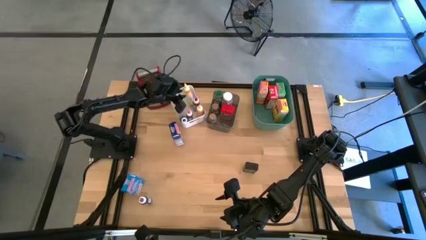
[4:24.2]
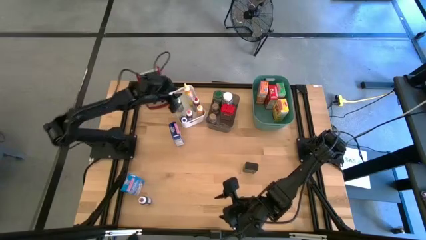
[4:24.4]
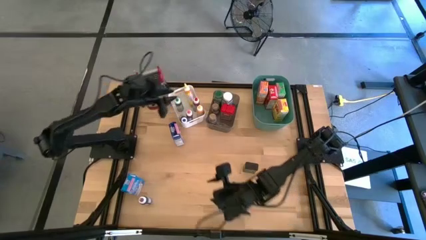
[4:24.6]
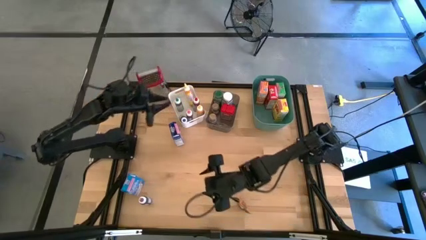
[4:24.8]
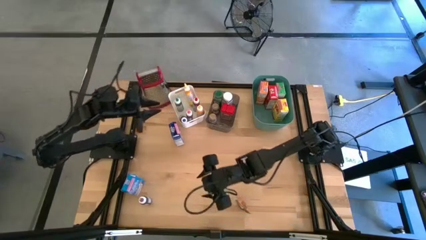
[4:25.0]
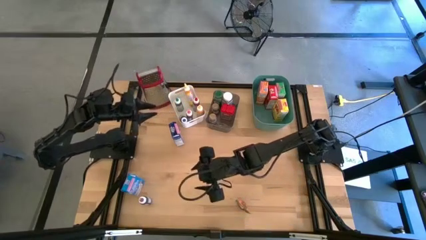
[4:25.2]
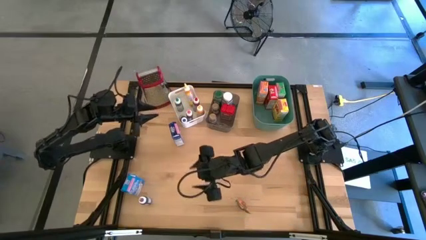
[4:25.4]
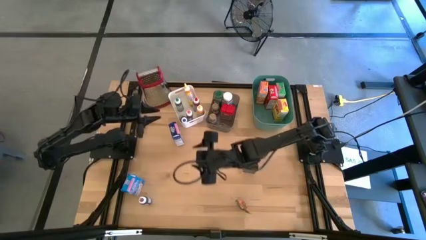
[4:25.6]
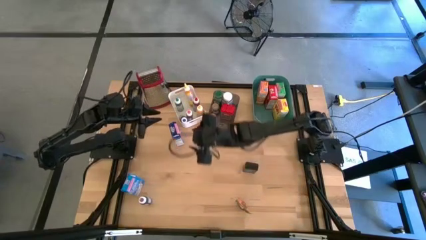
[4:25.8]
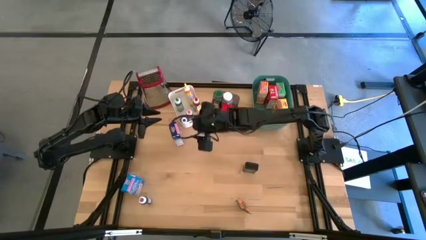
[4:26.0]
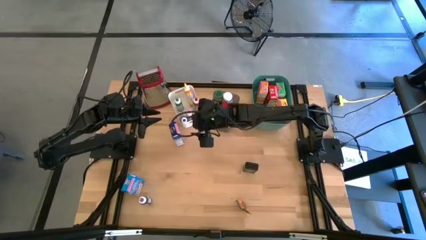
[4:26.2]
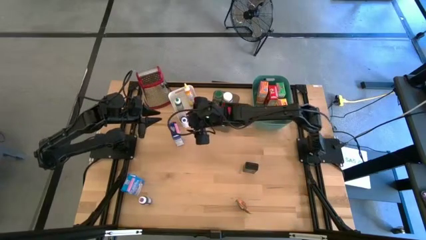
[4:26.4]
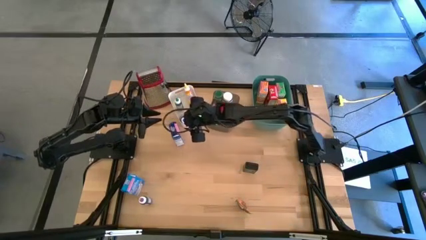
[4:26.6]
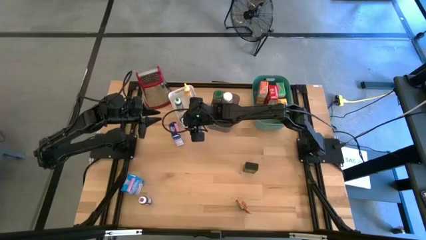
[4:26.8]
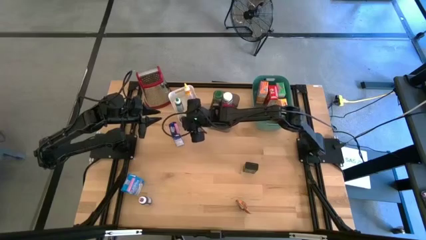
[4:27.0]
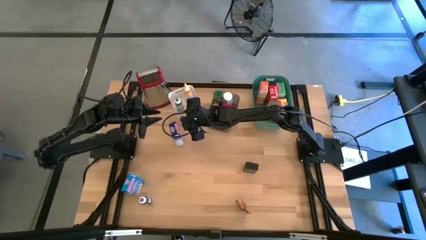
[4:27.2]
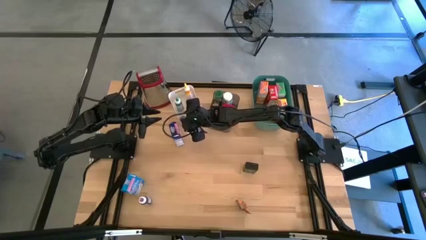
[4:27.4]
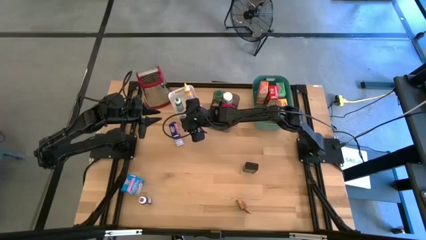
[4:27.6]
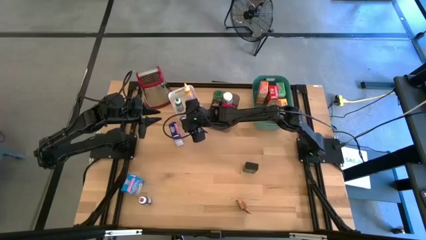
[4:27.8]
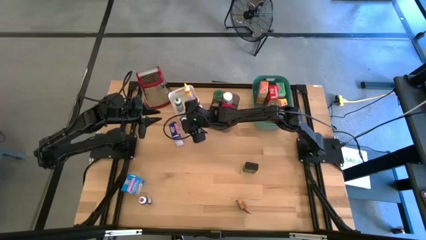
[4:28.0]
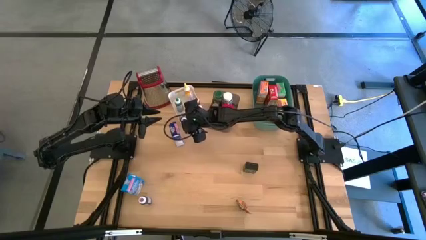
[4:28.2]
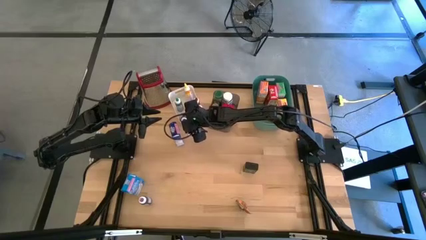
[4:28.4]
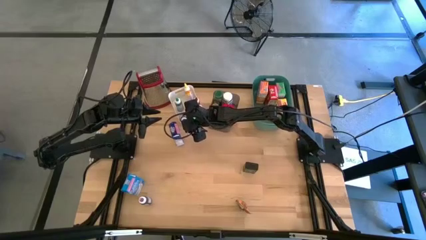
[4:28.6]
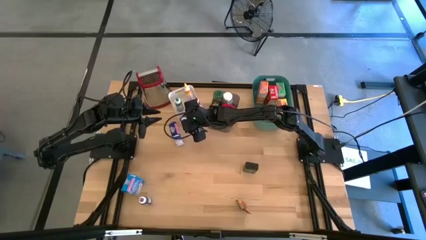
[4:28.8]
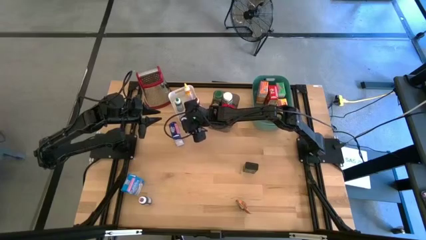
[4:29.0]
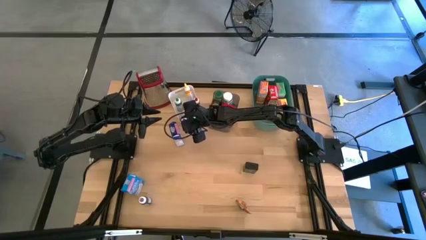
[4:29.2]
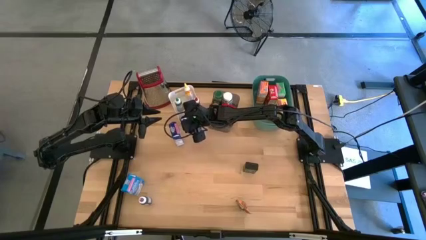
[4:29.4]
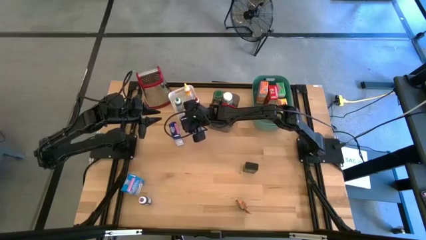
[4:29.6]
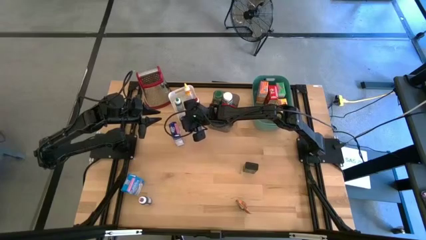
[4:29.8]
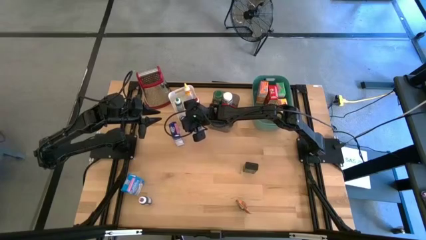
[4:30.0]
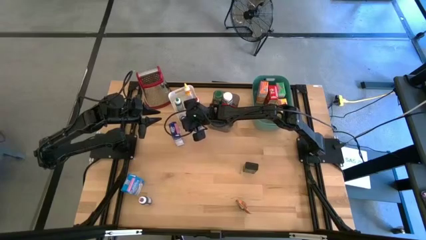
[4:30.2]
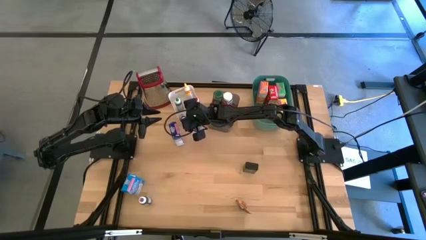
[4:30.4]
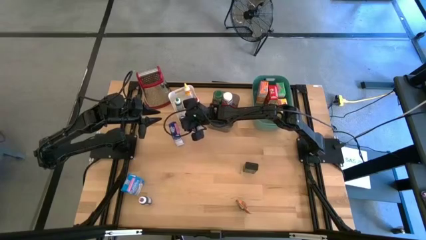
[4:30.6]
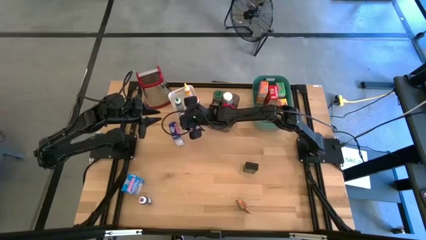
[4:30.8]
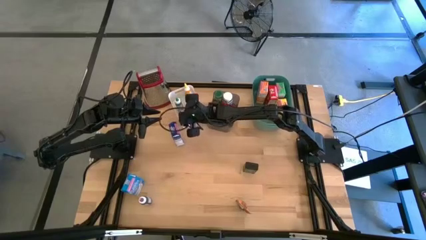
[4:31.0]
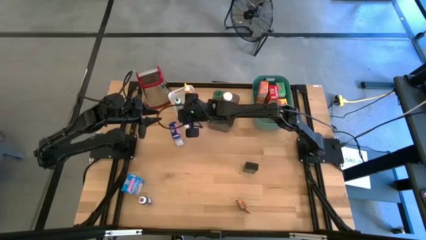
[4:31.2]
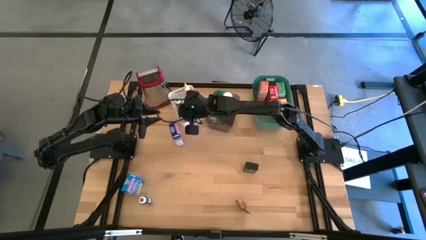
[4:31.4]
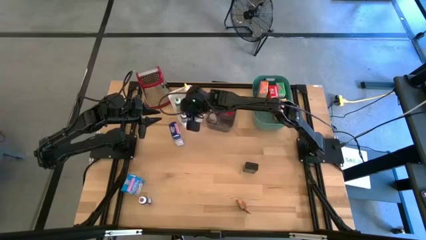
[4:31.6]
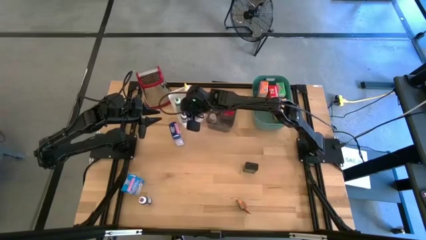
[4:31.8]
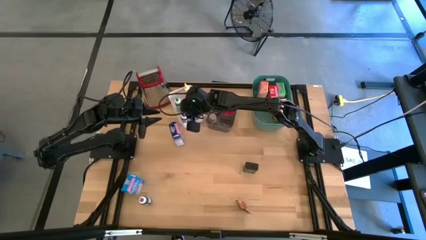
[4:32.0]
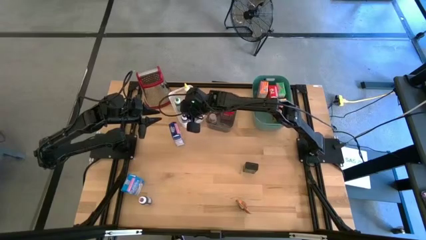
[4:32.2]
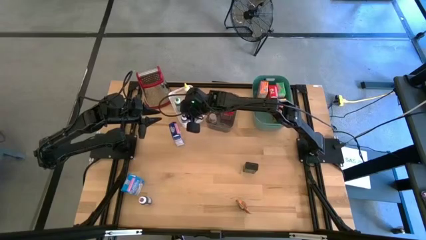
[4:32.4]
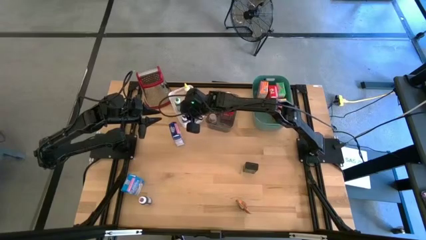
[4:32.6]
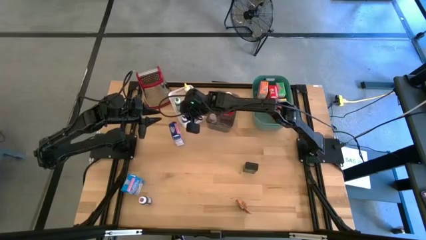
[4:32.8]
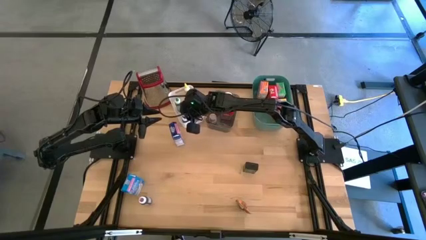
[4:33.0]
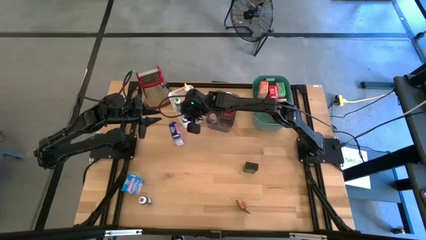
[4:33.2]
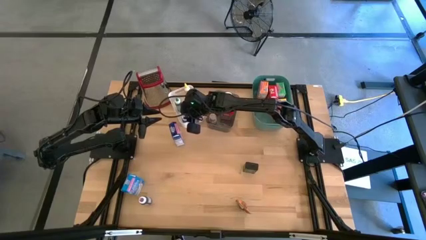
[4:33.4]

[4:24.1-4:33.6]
Task: Pick & Place Kitchen Items
Adjust the blue food coloring in the white bin

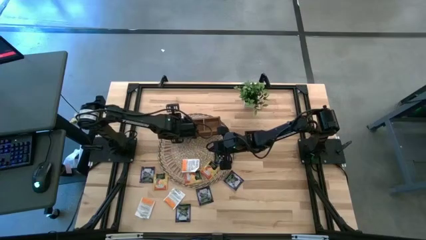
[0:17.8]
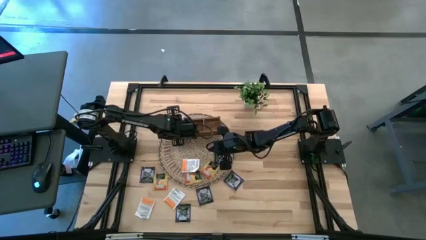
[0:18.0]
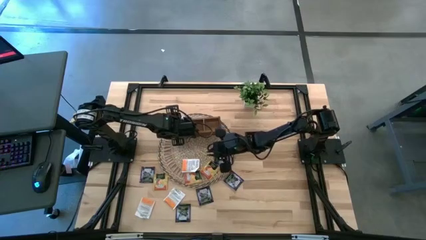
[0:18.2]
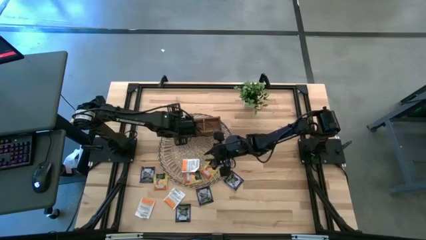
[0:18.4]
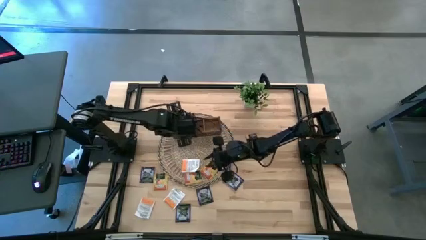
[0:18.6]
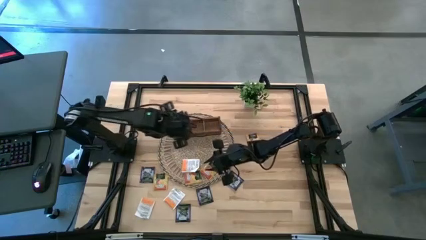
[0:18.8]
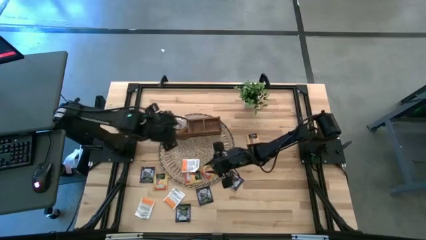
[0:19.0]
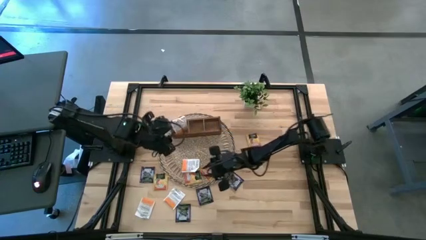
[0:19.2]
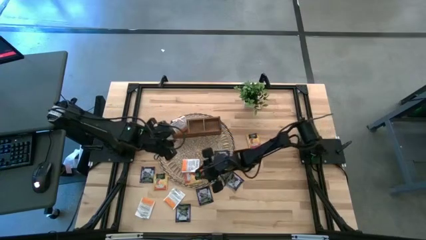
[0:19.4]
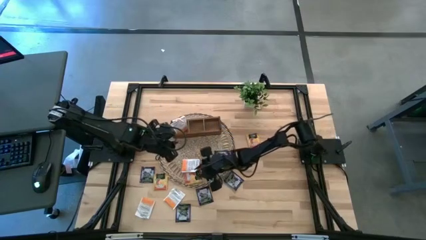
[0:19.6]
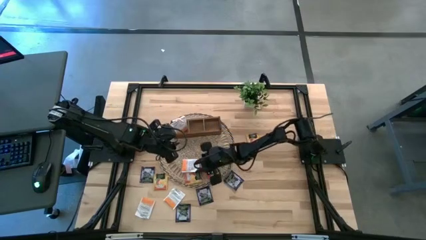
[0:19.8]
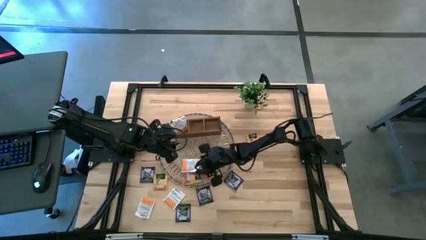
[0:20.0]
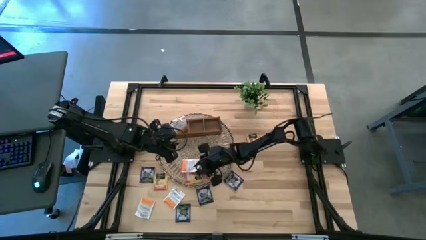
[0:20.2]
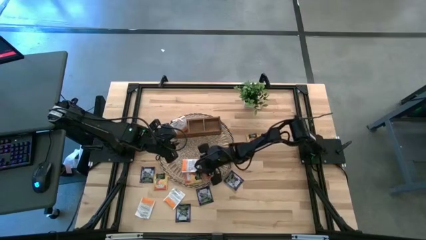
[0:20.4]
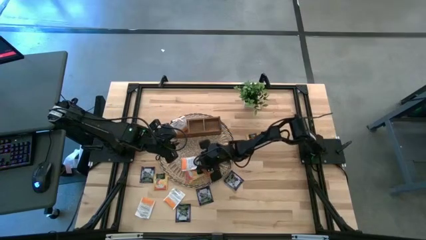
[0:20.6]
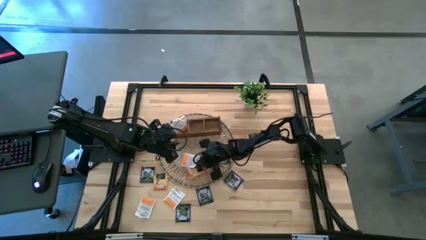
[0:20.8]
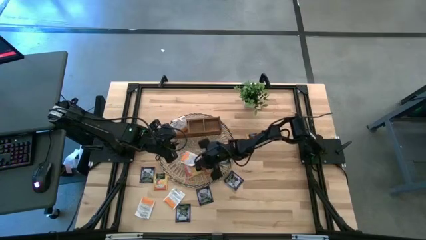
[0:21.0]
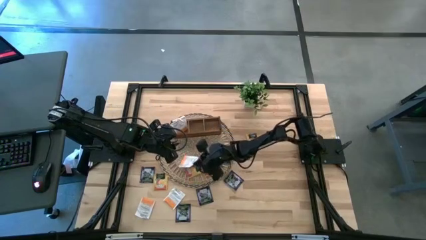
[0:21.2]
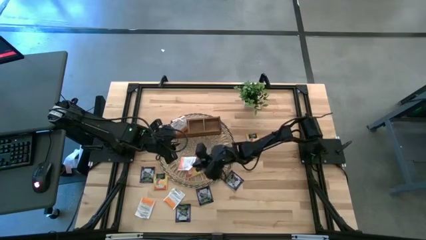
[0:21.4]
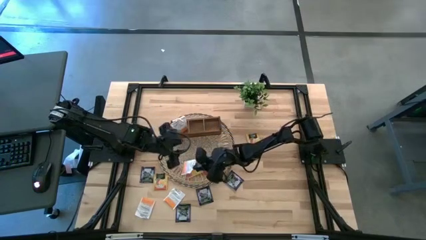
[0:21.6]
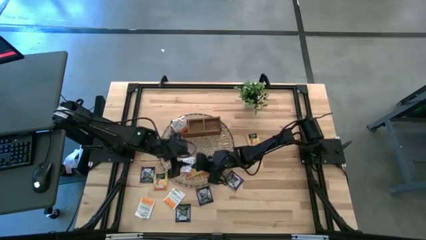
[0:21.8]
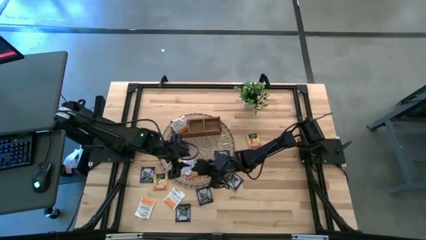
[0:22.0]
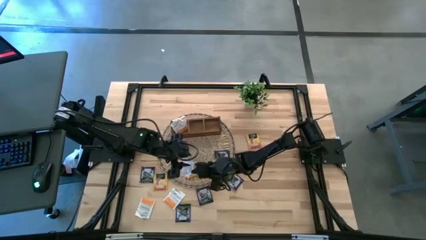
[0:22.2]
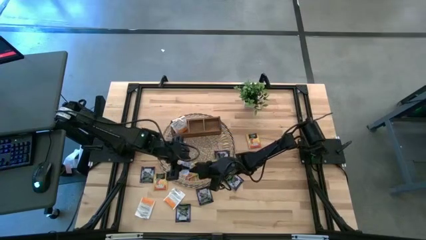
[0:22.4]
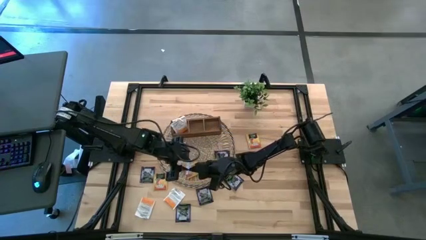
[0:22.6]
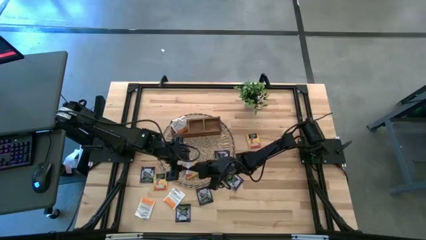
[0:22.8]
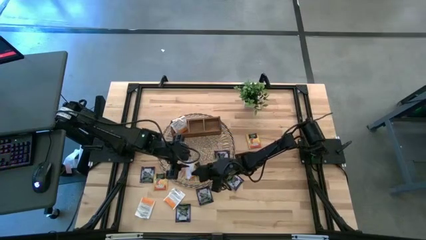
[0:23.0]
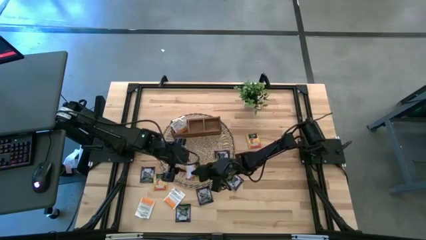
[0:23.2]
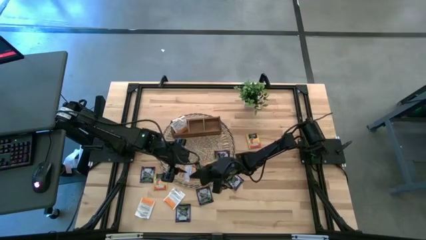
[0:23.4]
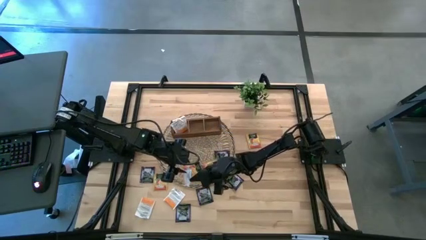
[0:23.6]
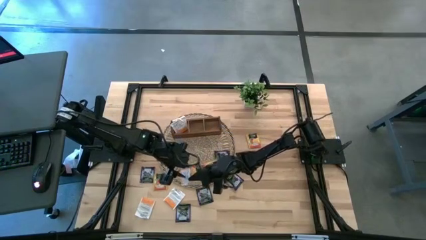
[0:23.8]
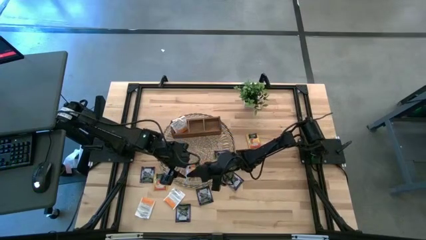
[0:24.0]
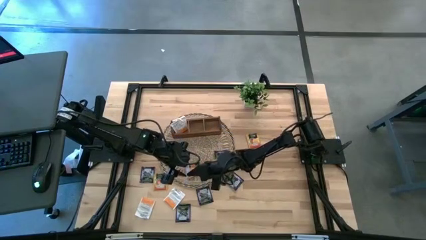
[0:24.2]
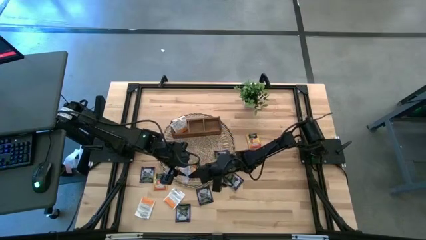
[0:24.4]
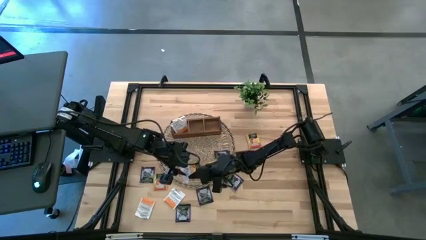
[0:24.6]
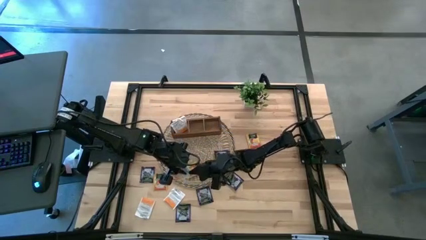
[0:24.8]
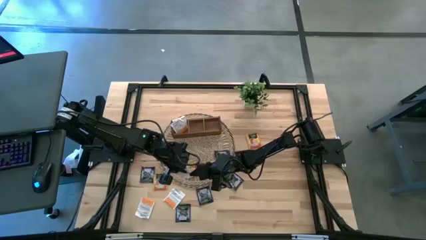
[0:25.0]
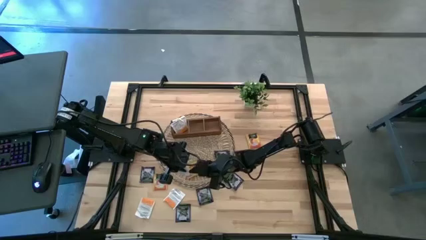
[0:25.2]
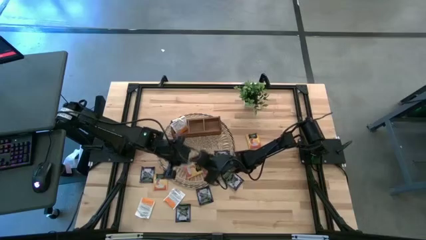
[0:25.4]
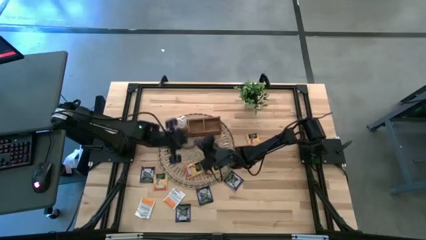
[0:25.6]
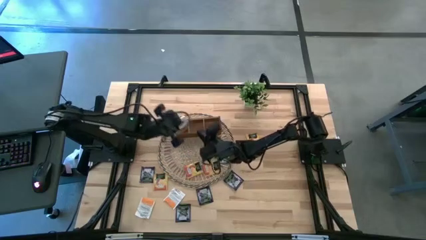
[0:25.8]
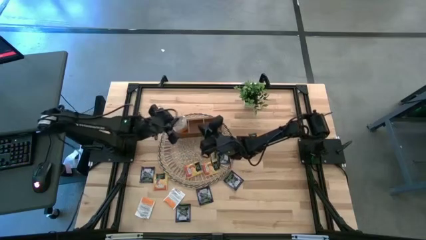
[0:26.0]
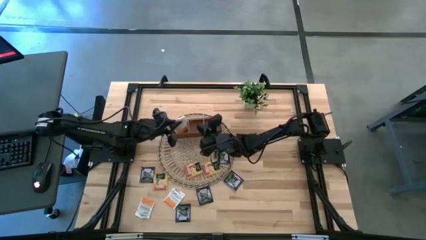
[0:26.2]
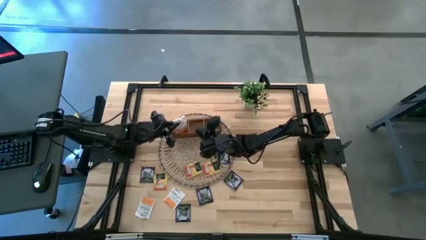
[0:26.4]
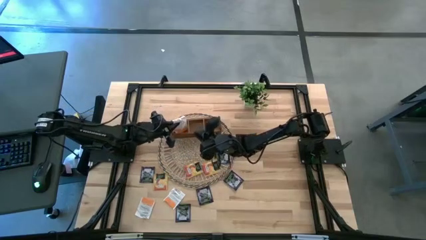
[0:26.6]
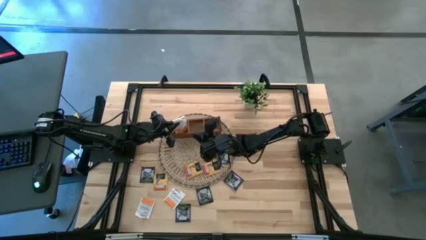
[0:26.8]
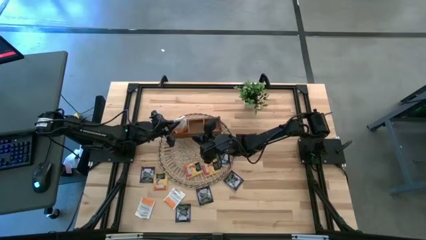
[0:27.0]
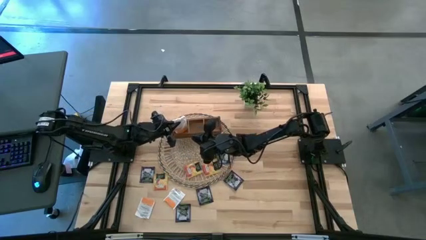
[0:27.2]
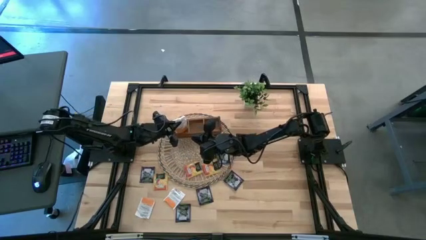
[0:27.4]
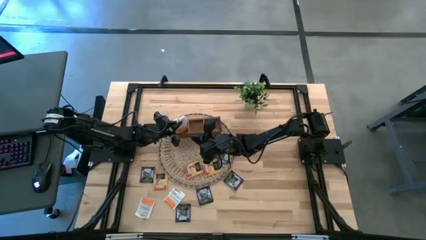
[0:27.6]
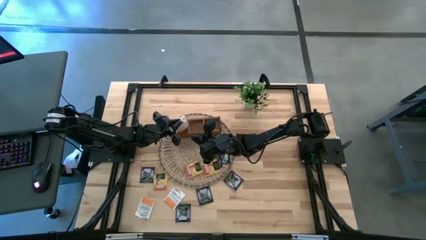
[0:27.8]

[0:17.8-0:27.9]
Task: Pick & Place Tea
Put the white tea packet into the left compartment of the wooden organizer
